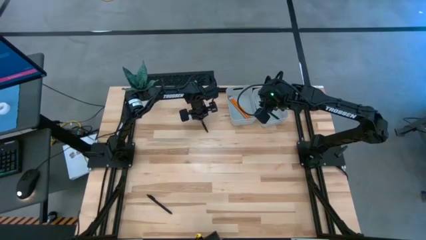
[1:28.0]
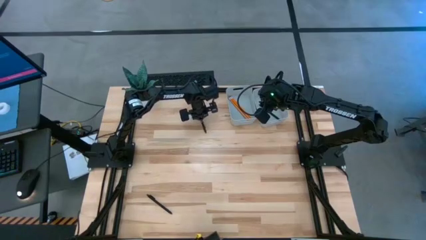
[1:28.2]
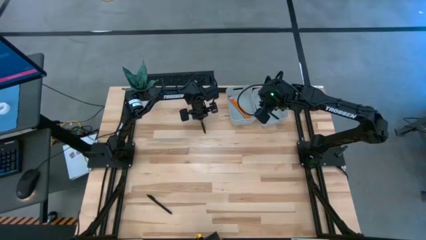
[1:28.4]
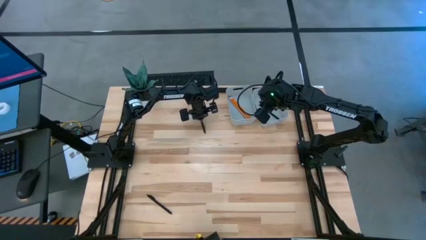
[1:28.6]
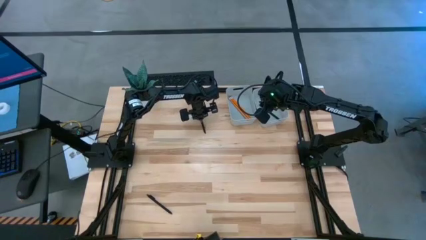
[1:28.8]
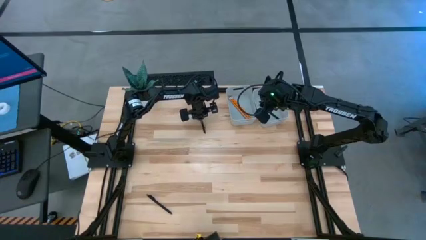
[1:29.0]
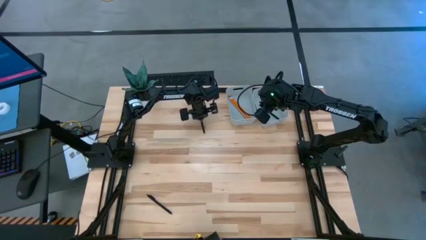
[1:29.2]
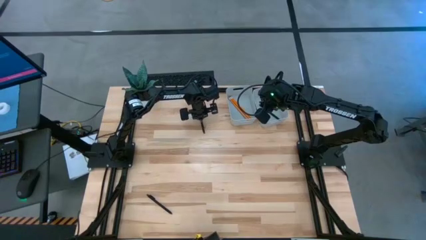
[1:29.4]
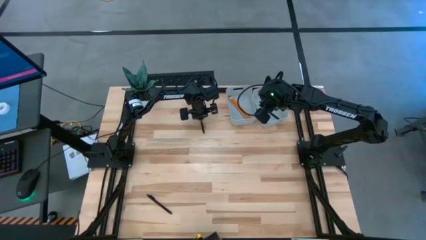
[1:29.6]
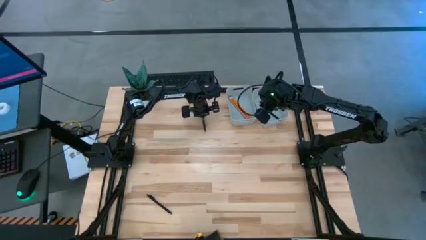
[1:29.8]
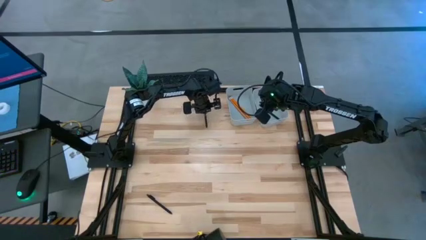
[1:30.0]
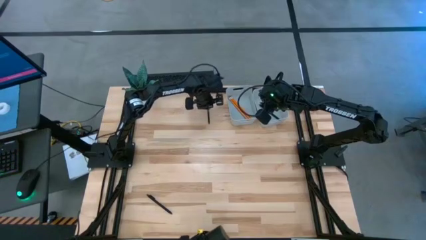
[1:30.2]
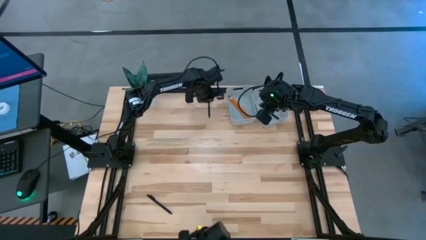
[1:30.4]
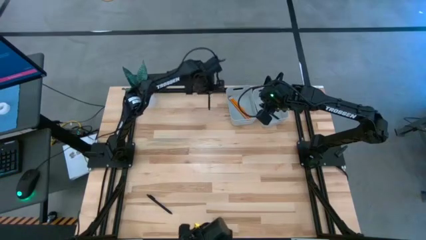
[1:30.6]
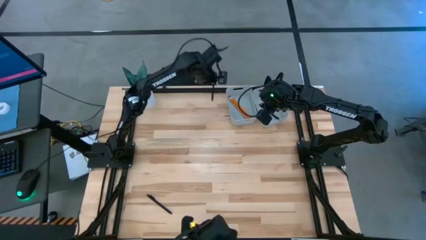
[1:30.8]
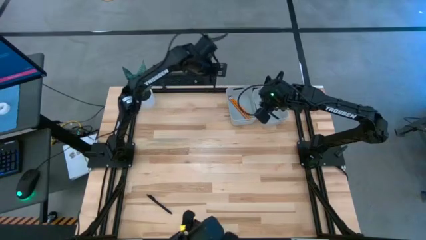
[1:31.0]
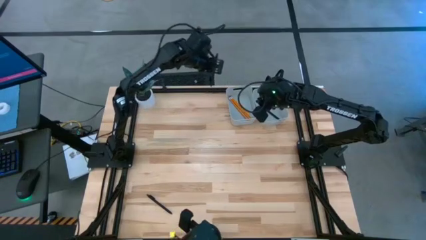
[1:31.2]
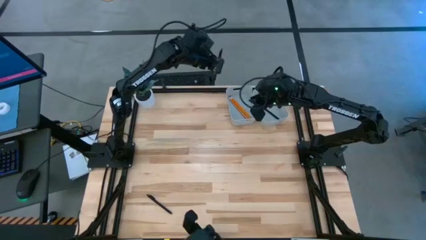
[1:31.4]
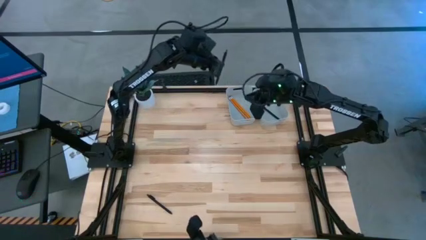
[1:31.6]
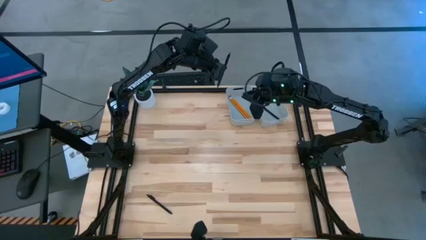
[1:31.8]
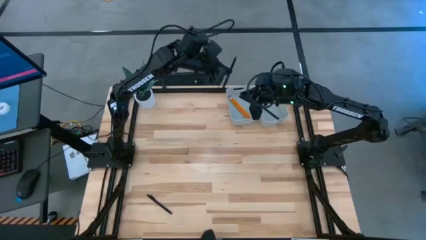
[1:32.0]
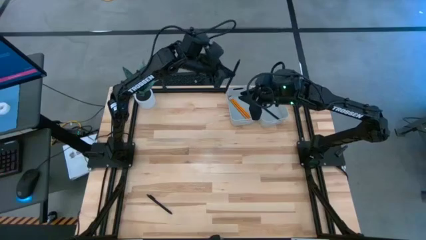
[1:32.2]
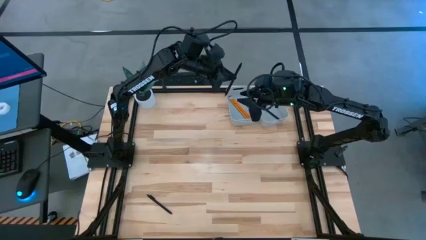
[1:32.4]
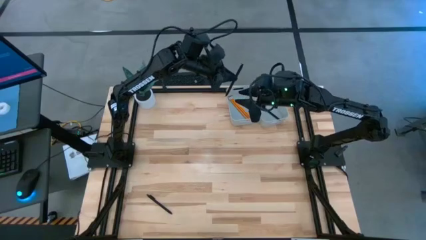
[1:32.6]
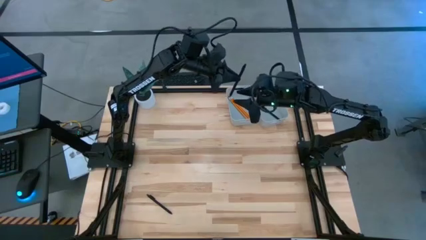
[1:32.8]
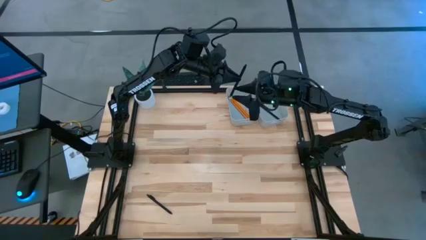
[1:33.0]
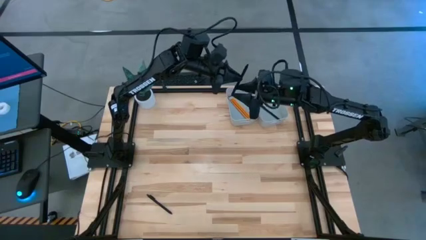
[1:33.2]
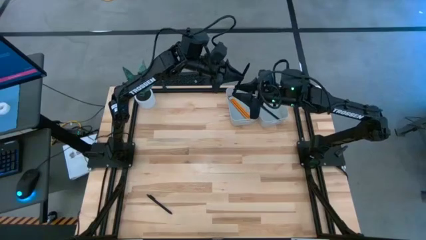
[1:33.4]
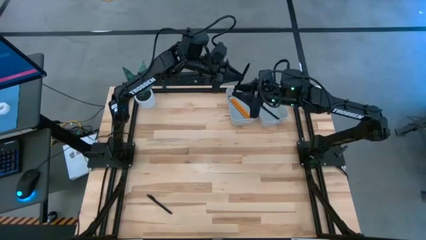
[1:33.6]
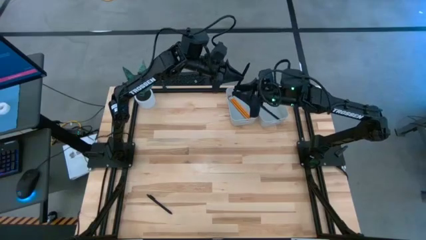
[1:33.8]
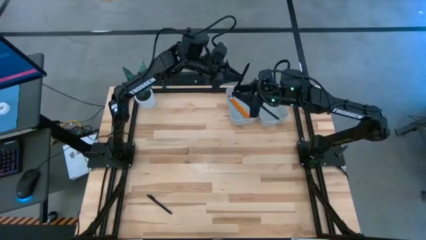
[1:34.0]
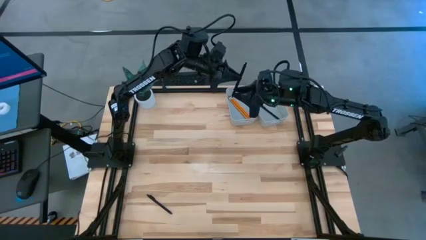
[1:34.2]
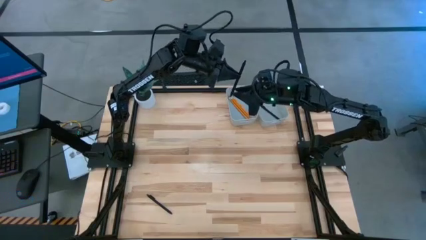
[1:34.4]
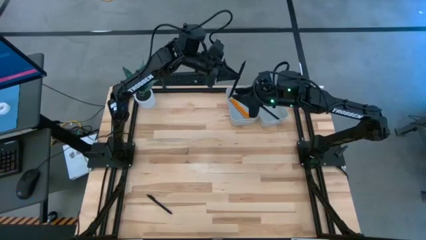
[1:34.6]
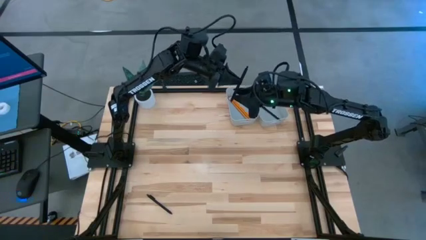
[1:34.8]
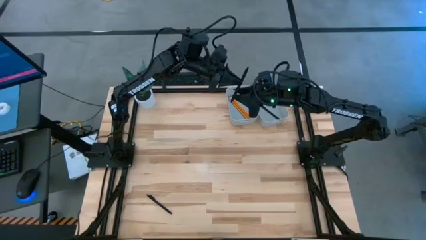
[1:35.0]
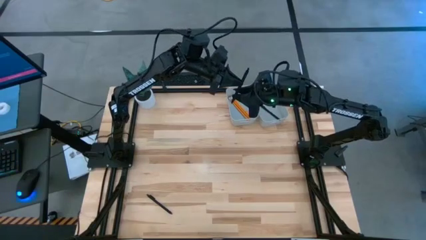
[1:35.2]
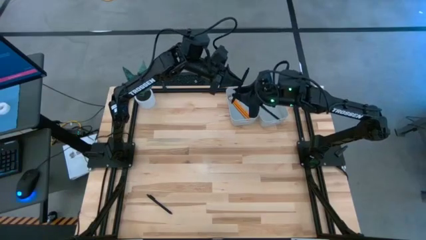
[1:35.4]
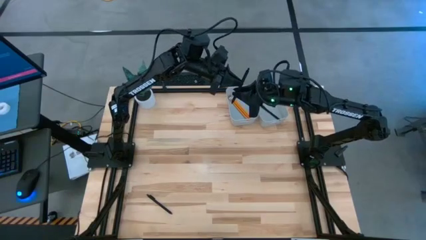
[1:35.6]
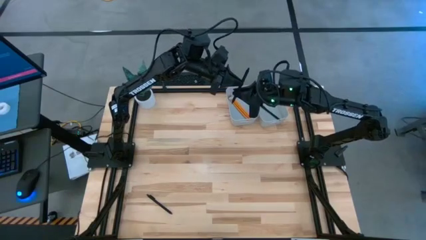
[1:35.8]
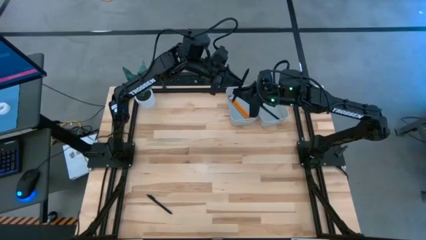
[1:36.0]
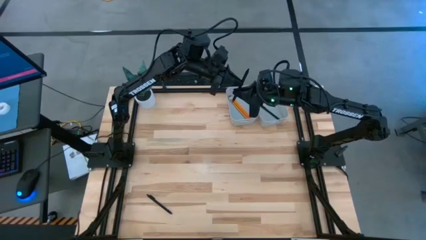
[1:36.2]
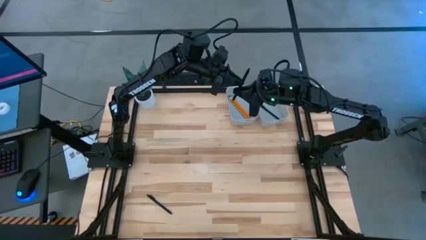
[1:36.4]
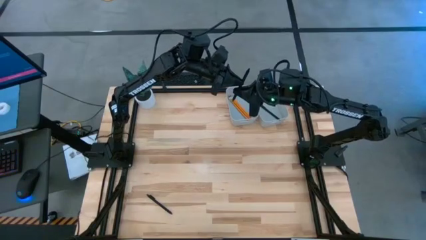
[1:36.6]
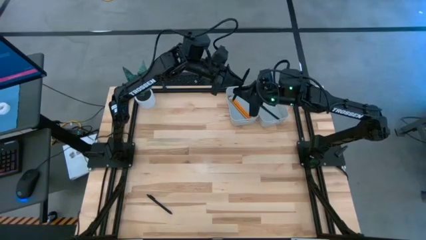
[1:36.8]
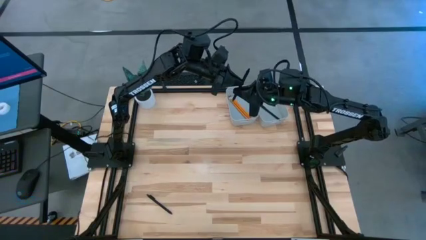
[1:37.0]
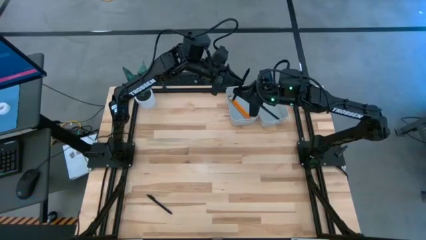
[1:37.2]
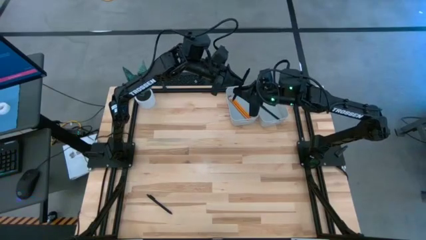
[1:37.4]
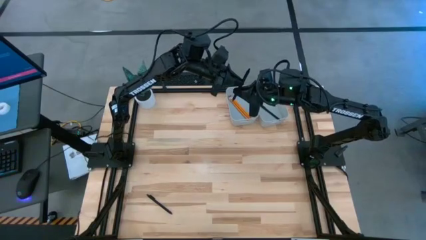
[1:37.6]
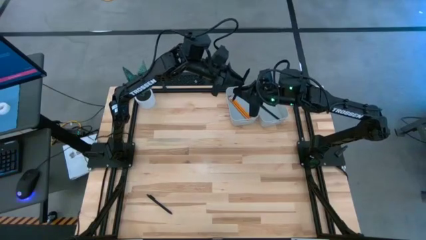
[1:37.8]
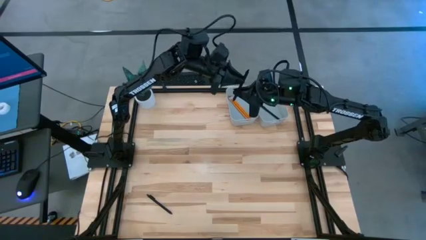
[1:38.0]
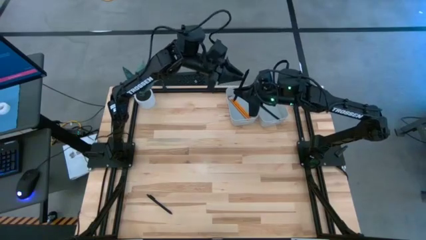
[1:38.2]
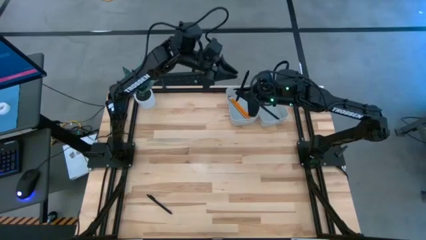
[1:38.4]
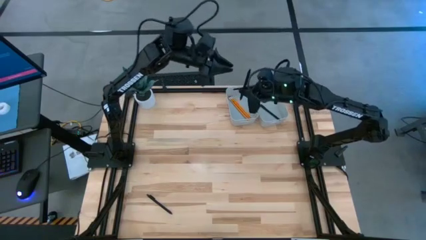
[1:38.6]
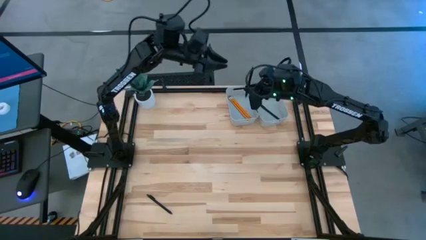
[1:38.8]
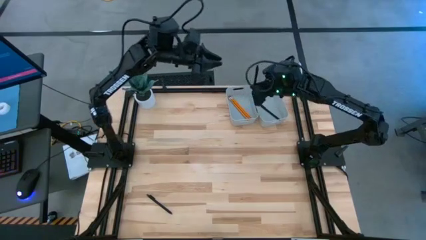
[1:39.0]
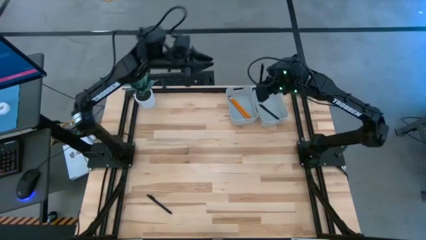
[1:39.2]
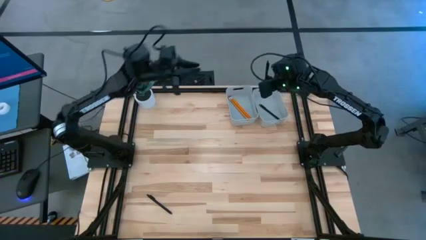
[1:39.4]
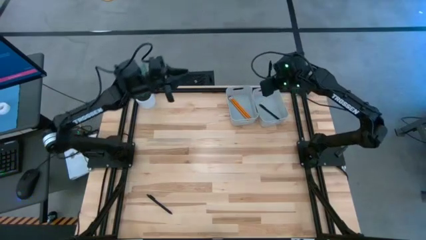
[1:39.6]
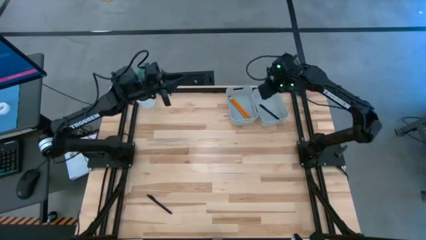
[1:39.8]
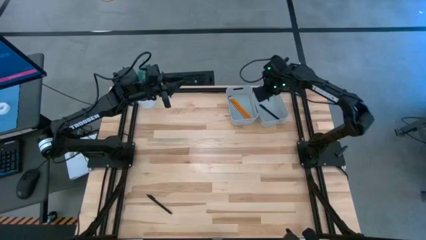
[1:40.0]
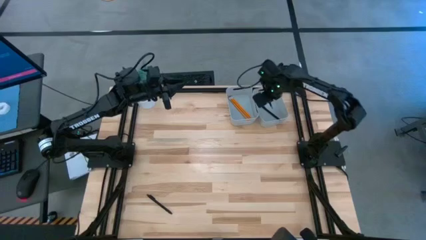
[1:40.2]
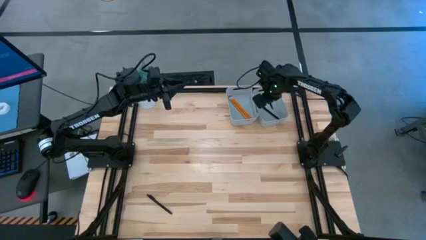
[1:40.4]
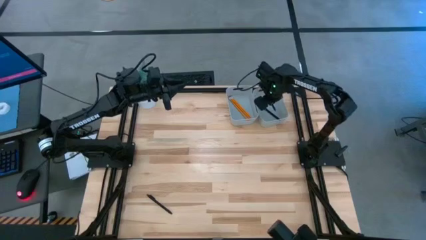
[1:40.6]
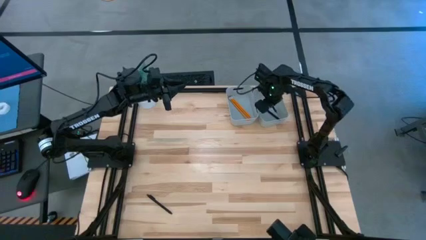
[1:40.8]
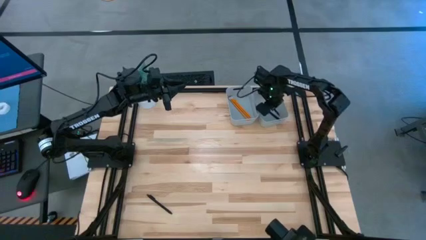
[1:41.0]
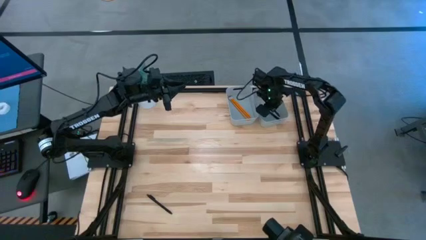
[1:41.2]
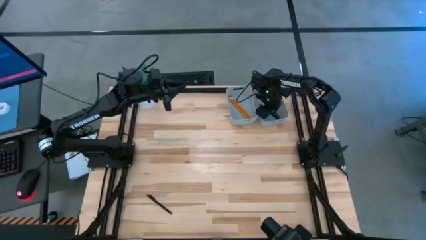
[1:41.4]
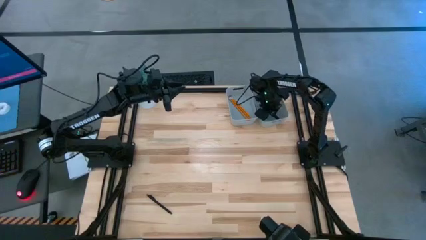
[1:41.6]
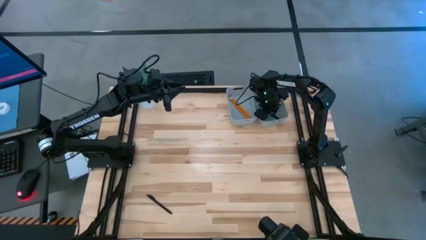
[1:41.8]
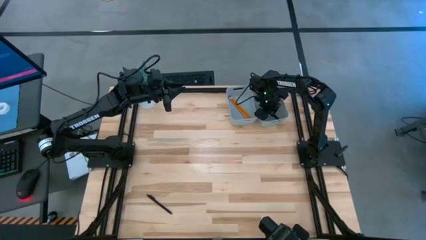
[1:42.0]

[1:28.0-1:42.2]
Task: Sort pens & pencils
Put the top black pen into the right gray bin
